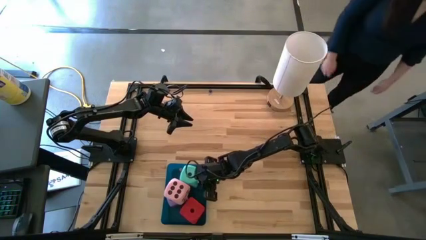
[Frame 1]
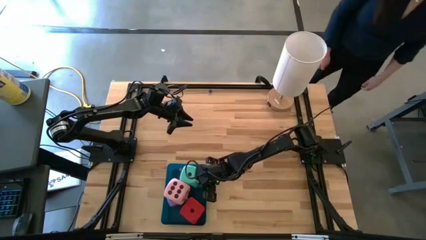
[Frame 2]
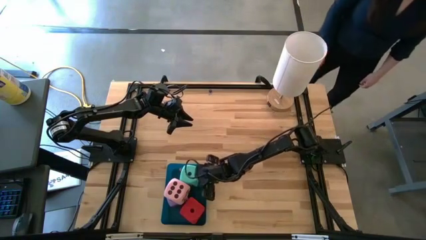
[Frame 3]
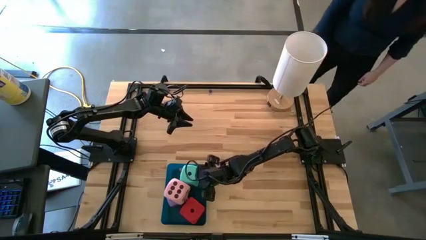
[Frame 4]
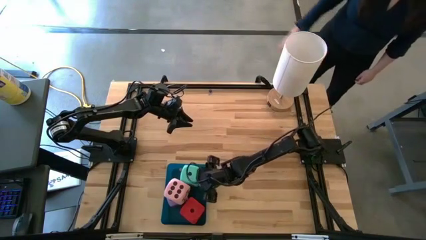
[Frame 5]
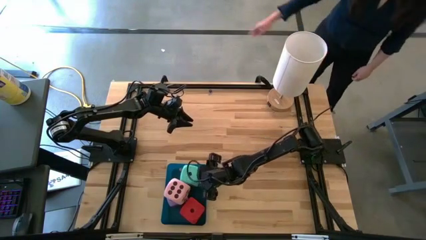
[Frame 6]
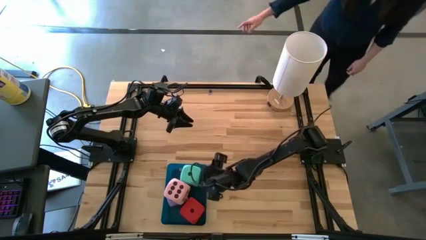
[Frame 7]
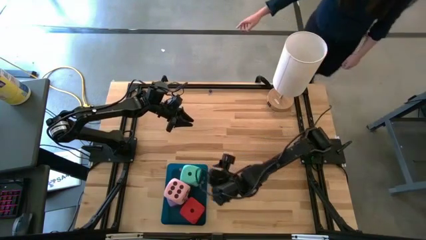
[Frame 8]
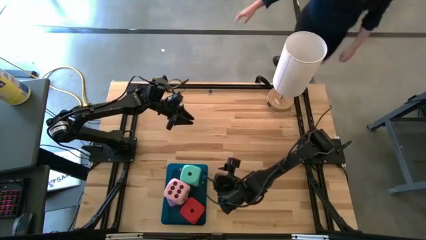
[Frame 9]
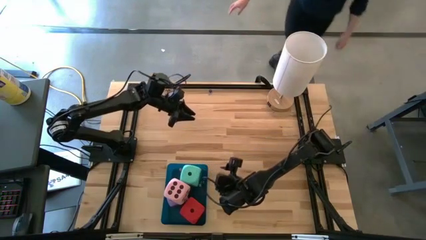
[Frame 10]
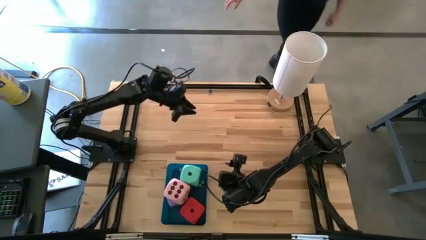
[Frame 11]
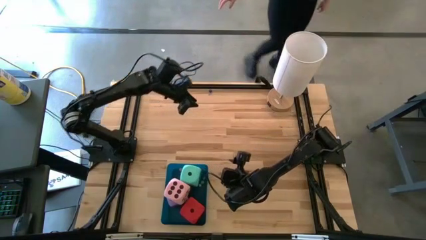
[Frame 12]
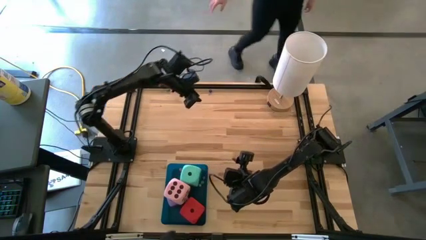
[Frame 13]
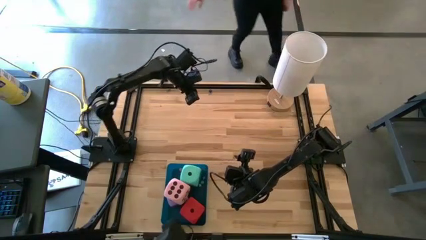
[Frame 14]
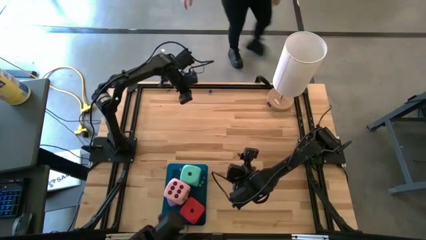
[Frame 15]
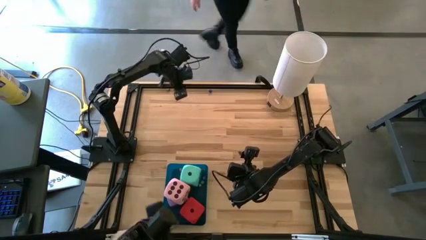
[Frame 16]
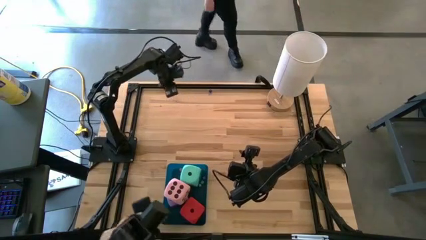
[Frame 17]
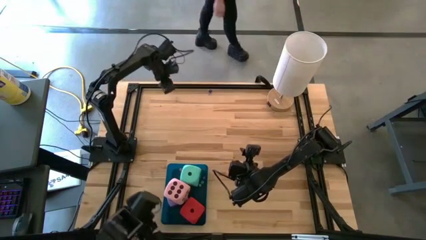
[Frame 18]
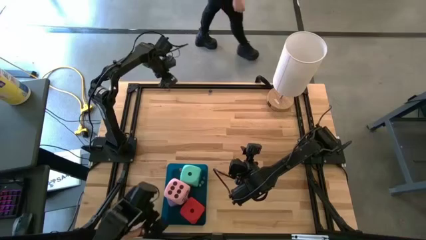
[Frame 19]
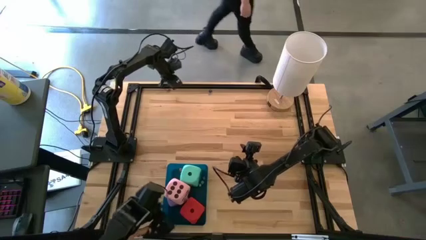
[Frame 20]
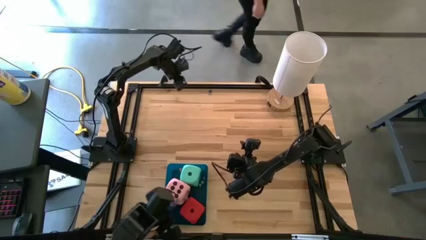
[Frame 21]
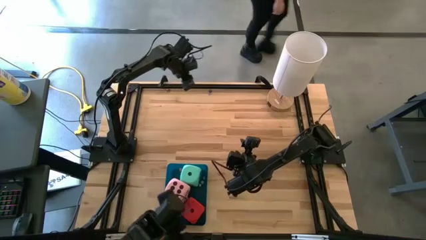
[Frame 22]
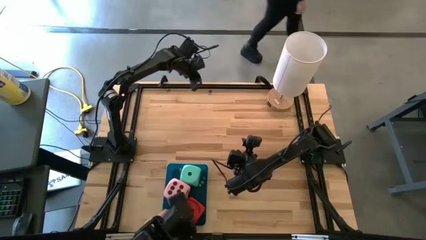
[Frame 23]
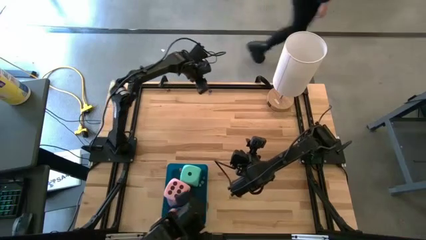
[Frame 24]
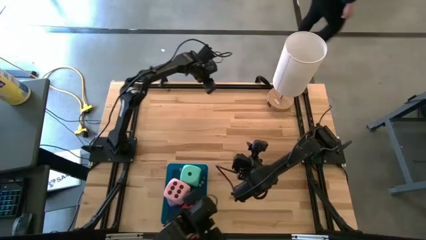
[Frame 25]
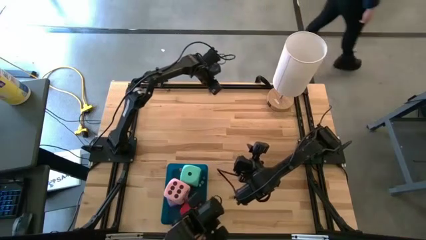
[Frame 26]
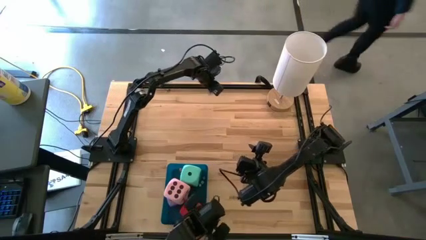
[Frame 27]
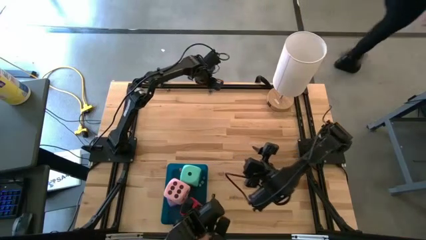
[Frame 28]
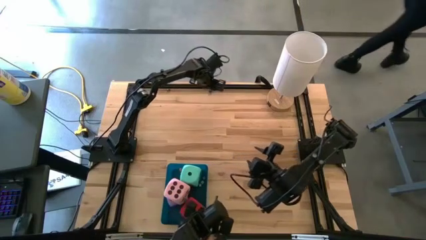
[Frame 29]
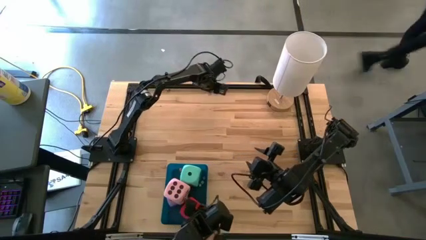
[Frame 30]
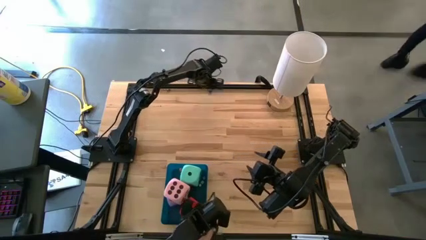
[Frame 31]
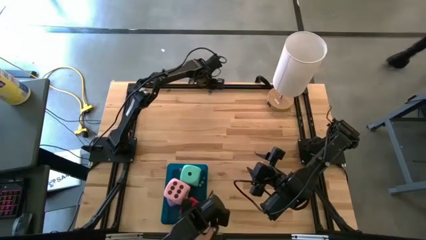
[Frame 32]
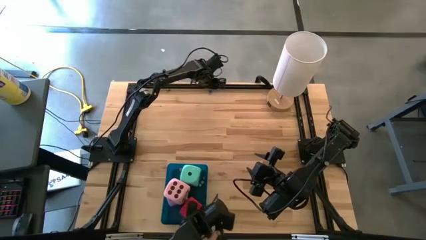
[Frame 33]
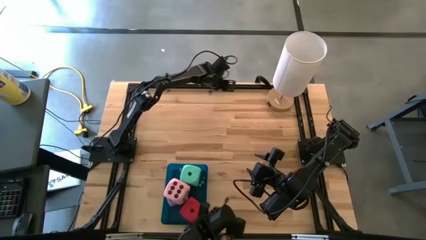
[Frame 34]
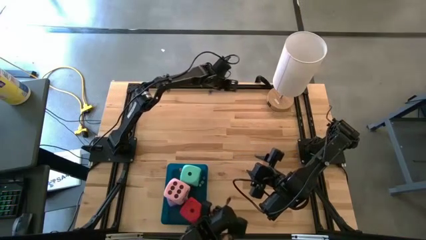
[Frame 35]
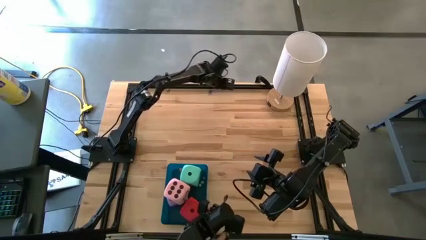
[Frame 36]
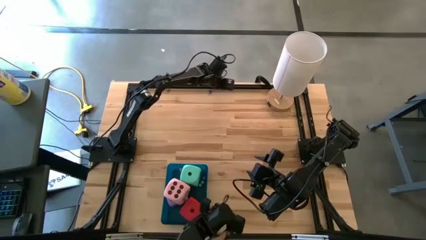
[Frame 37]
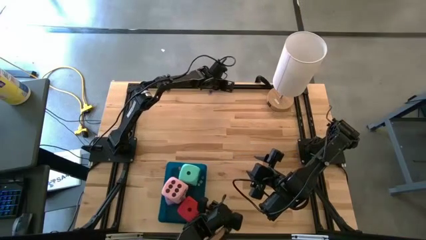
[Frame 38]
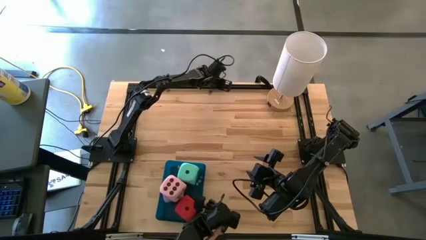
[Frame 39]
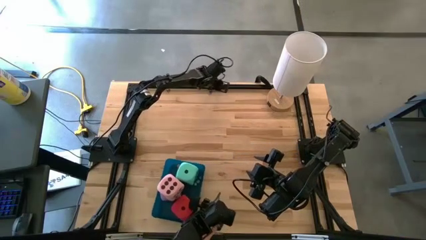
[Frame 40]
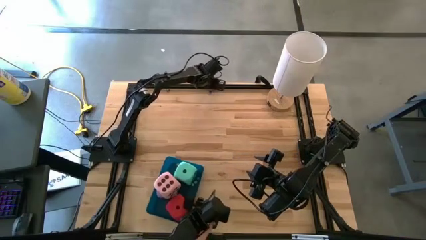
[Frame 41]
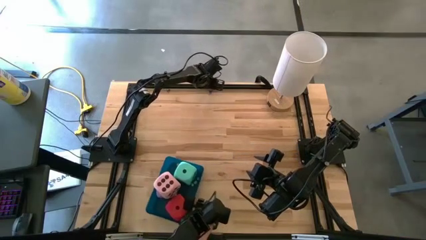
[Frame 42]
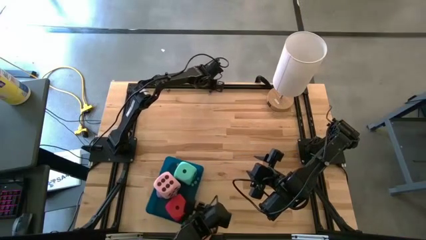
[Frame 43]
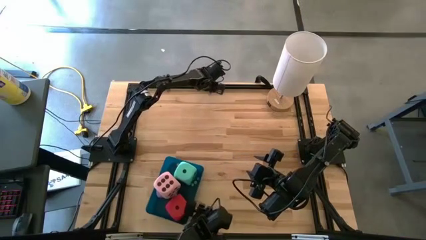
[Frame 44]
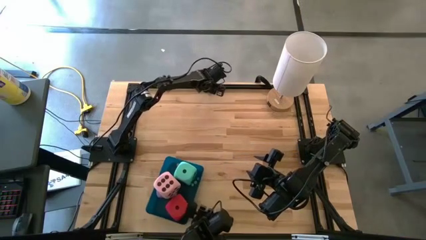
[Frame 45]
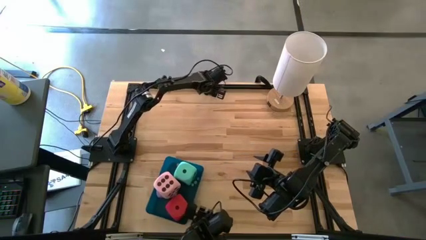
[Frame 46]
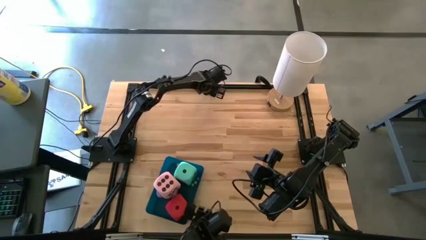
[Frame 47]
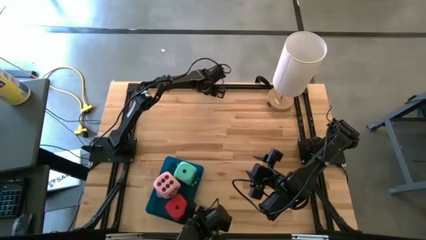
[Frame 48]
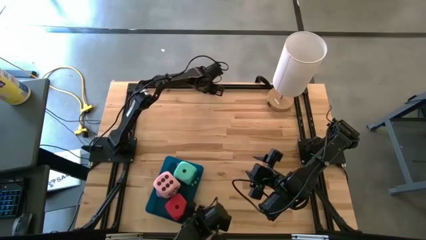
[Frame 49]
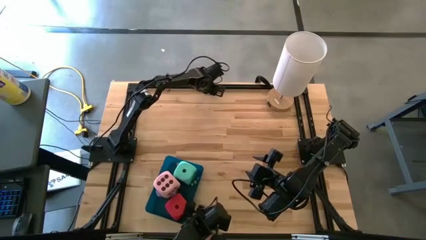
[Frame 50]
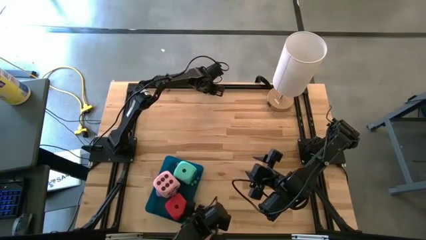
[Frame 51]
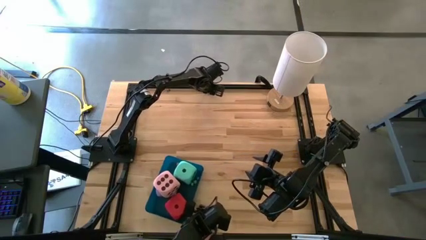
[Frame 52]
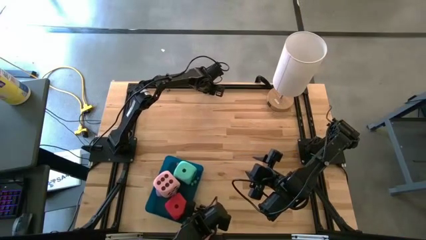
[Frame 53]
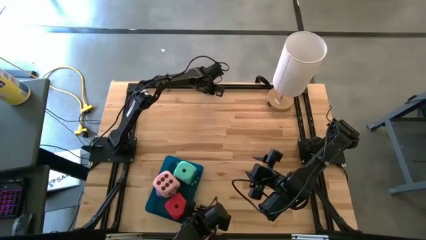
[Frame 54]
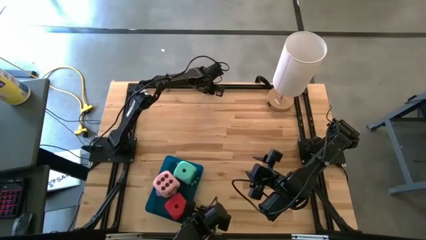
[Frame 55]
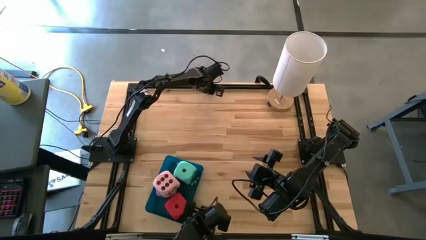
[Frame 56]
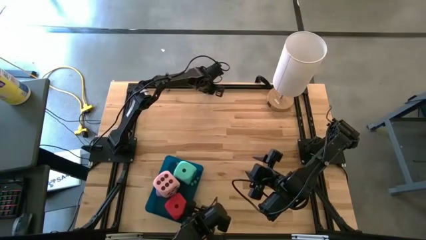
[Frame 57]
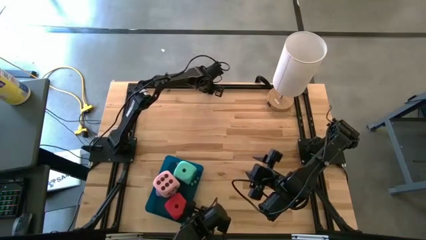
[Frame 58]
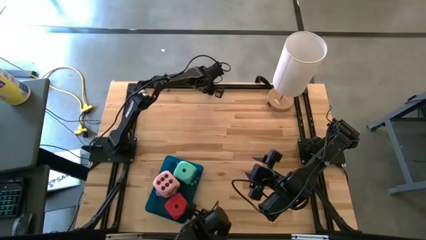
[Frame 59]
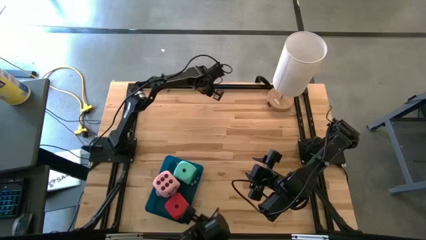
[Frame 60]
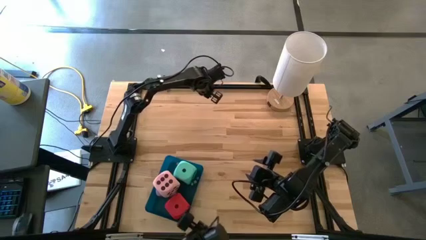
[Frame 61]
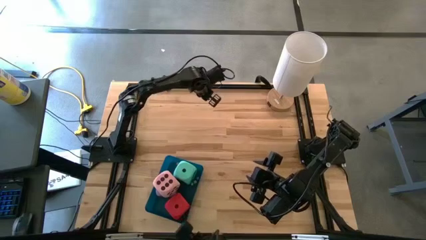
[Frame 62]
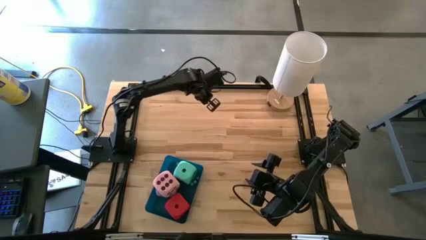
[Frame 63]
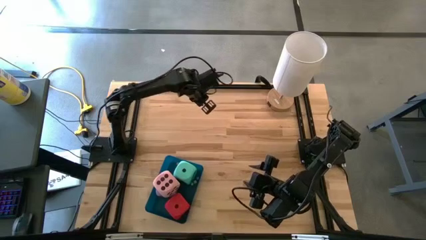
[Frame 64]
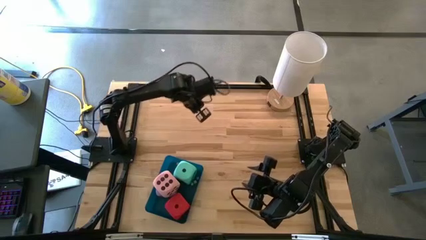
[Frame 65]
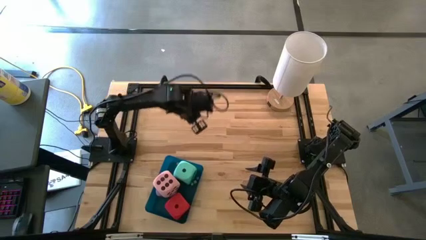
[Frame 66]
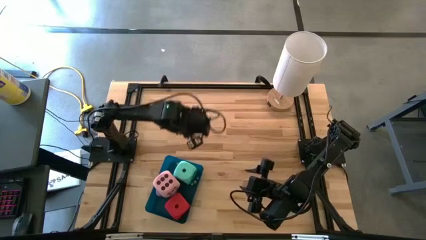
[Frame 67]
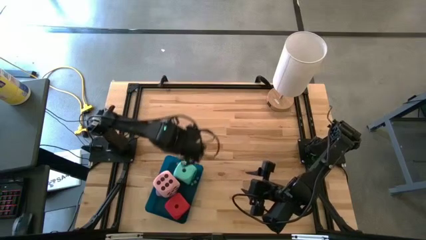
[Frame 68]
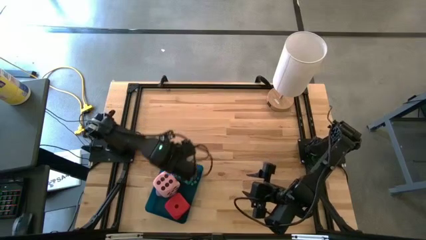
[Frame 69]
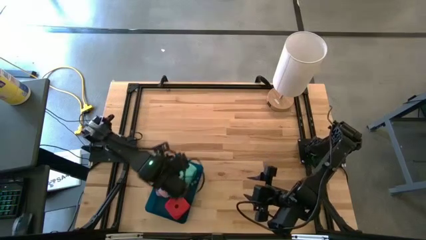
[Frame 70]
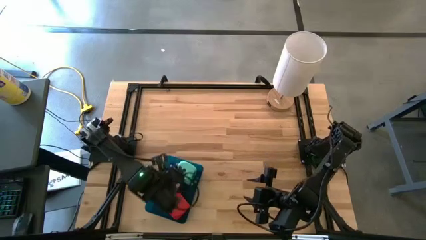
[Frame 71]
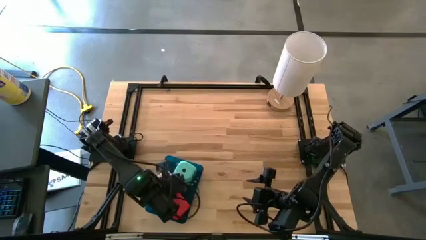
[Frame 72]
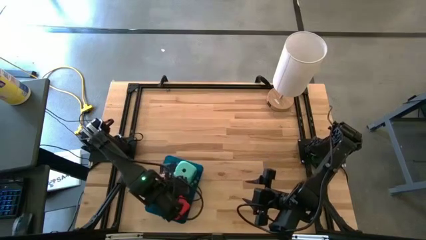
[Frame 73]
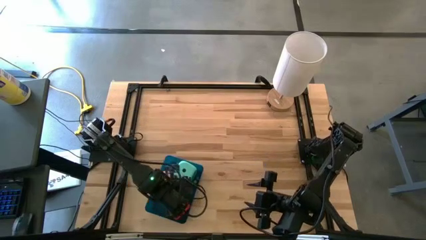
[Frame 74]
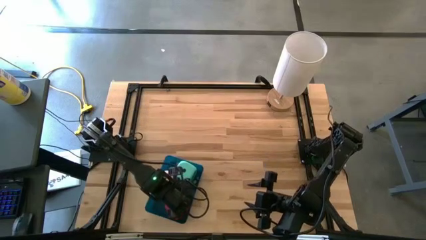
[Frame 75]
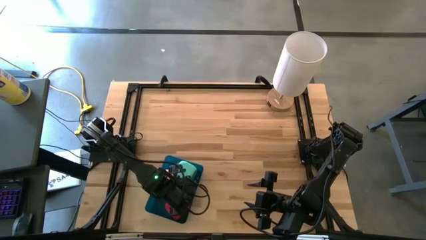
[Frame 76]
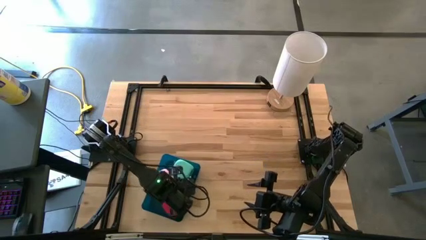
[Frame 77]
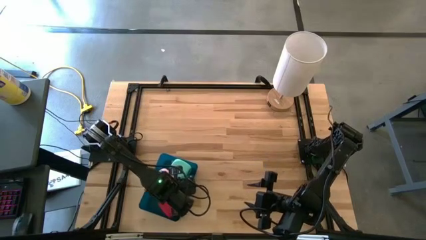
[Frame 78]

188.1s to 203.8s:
Task: Pick & Place Dice
Put the small blue die into the blue bin
